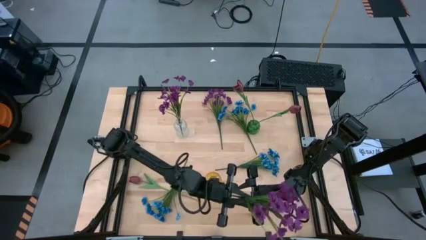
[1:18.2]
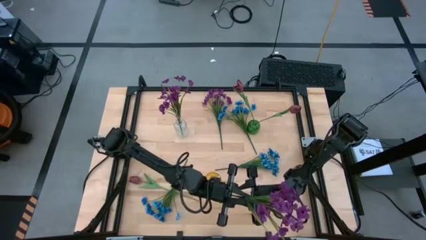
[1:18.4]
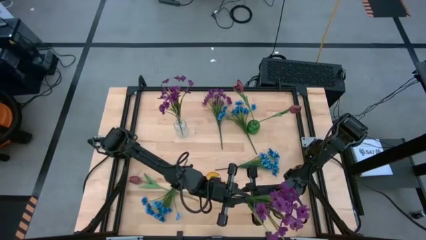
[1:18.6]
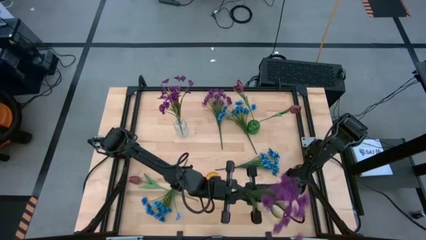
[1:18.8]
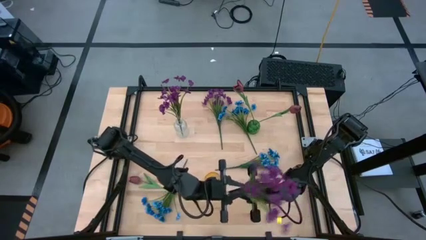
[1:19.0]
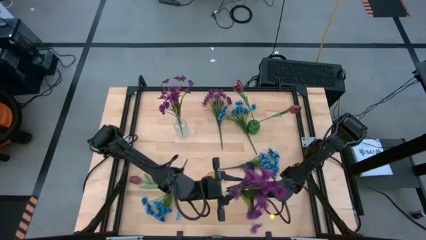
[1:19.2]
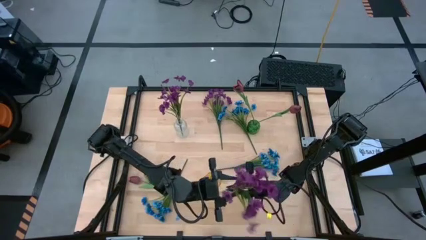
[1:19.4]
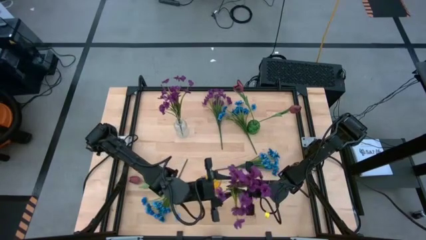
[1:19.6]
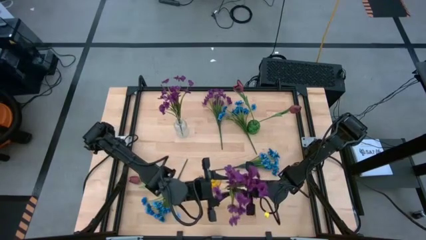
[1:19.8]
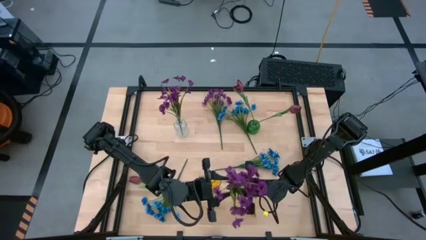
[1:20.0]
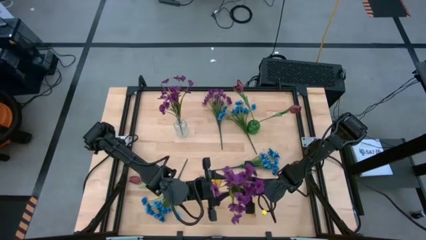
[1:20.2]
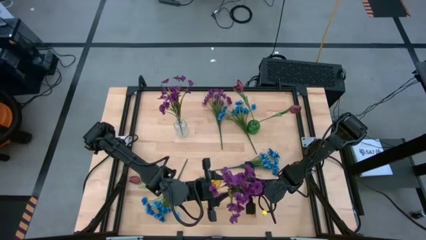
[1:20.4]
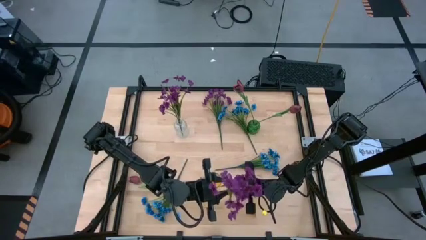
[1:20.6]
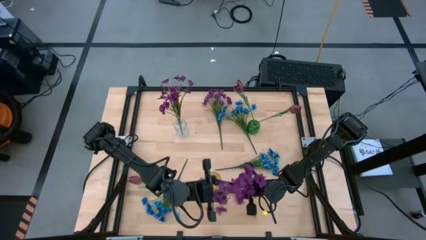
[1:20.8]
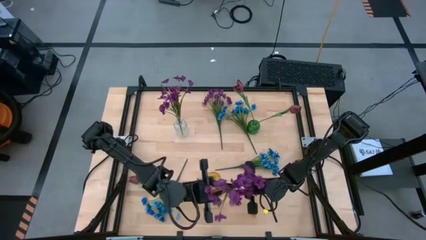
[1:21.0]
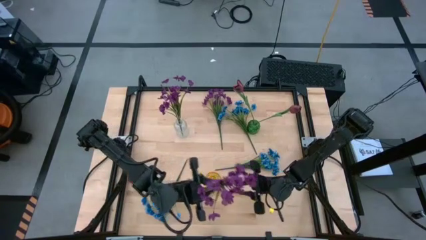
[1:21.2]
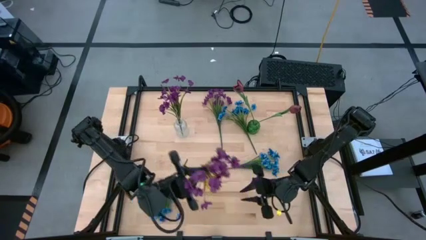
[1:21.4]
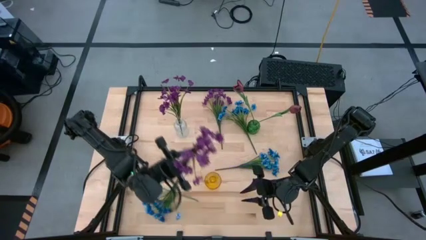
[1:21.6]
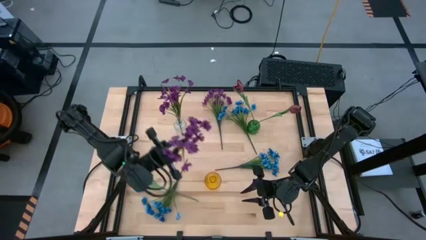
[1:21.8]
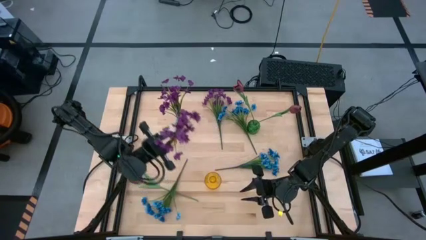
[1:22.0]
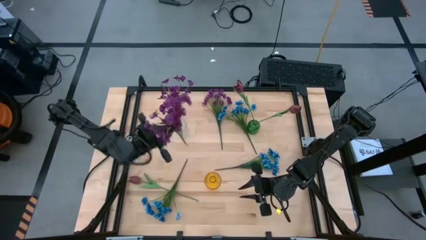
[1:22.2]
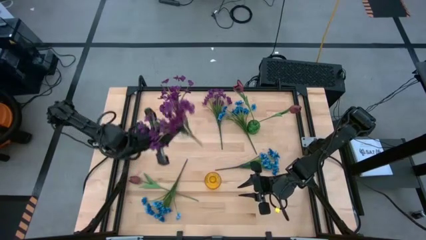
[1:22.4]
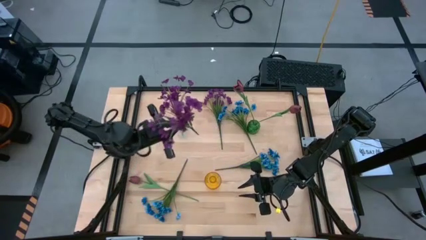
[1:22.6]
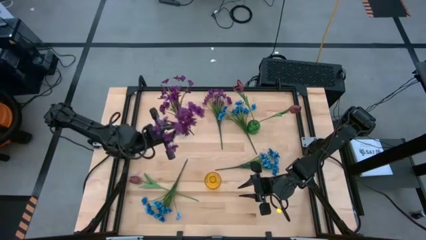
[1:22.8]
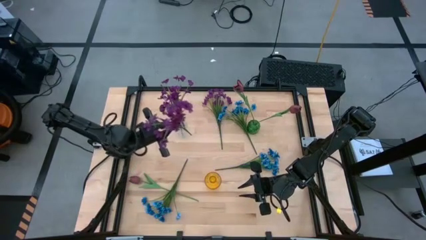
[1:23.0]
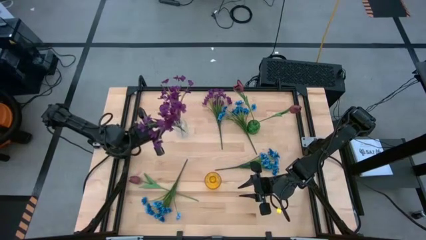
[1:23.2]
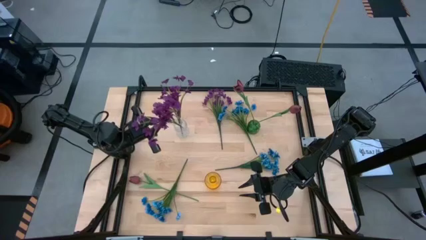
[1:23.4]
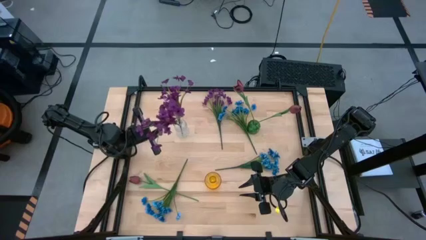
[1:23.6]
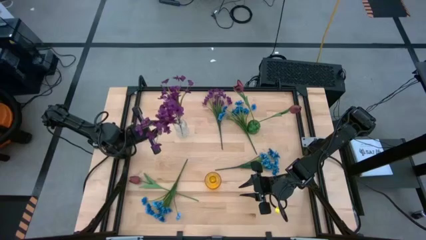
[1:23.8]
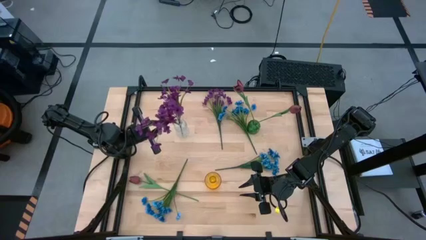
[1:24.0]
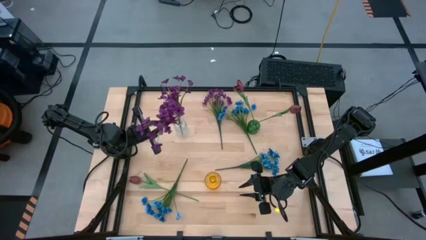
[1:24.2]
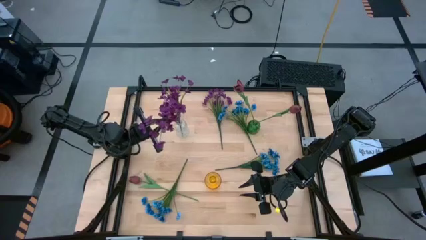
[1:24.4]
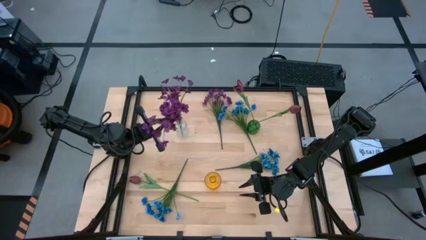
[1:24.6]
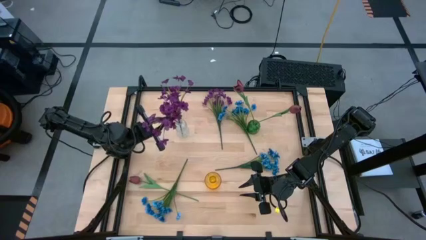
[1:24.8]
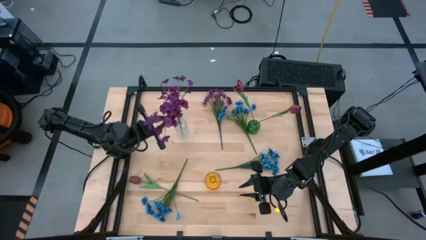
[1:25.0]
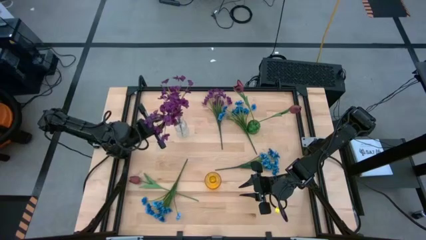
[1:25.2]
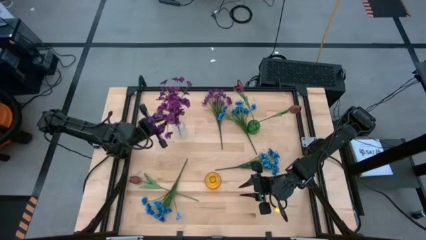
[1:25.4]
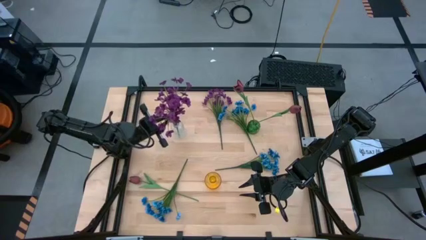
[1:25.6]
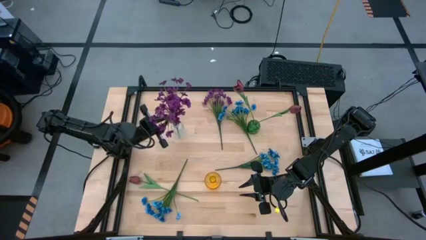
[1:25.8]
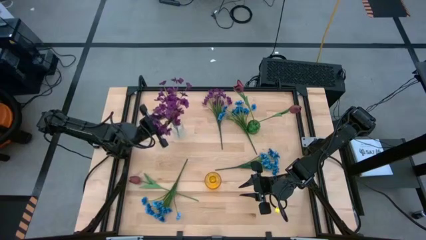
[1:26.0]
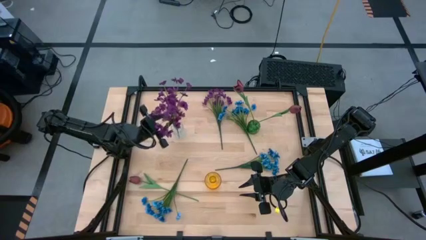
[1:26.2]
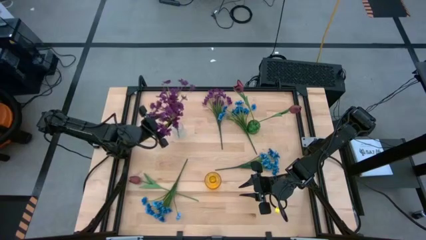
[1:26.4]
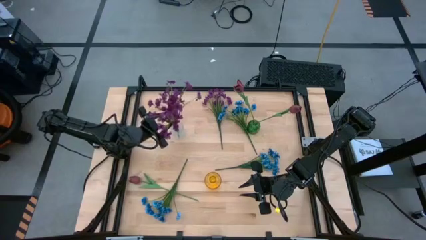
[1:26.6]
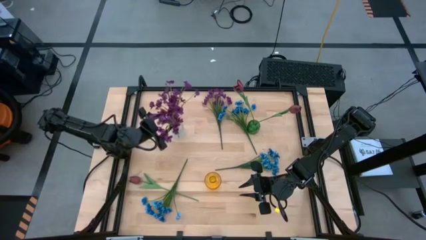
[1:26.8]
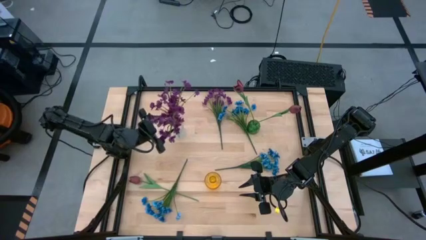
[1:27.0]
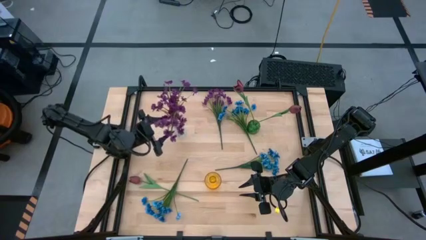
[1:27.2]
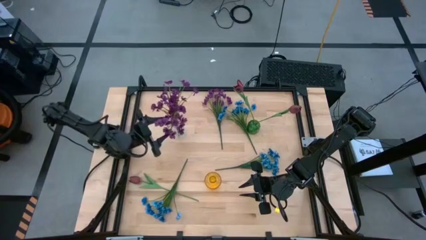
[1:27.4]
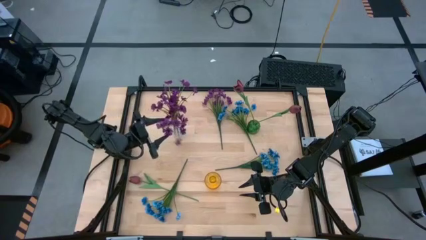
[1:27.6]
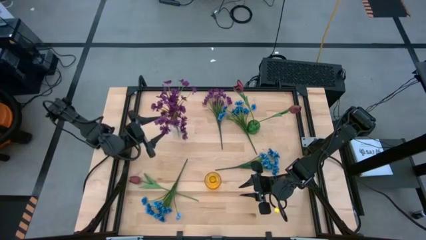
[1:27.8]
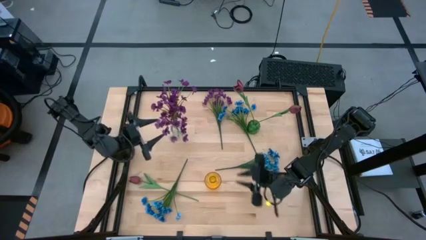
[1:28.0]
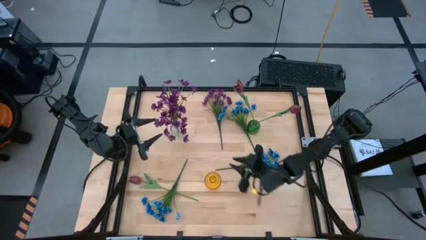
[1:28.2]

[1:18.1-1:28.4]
Task: Sort flowers into vase by color
Put the bottom violet flowers into the transparent vase

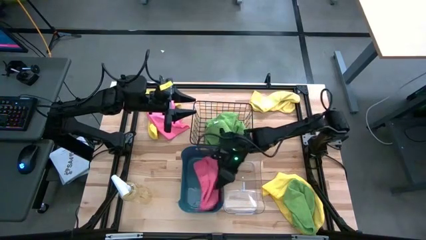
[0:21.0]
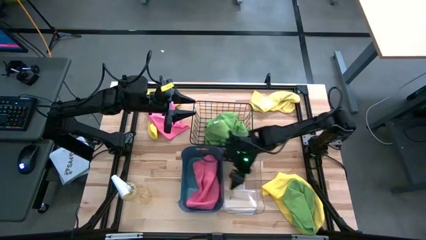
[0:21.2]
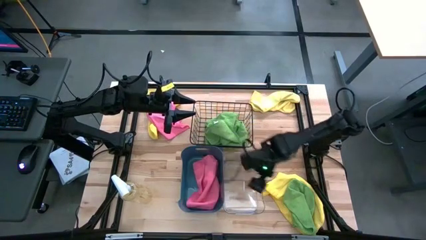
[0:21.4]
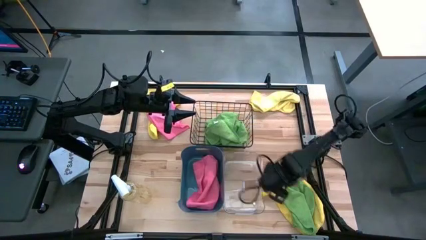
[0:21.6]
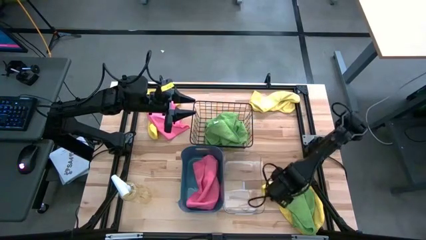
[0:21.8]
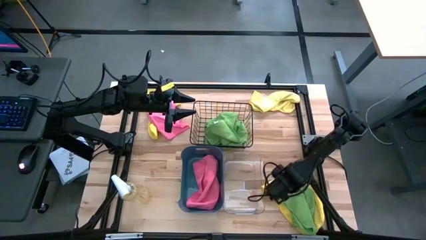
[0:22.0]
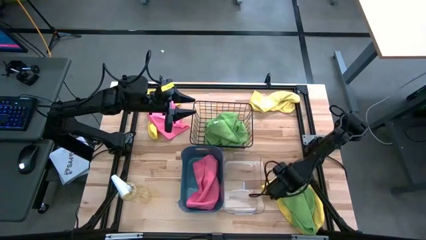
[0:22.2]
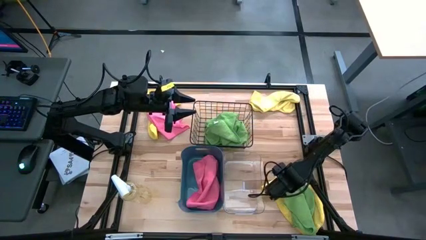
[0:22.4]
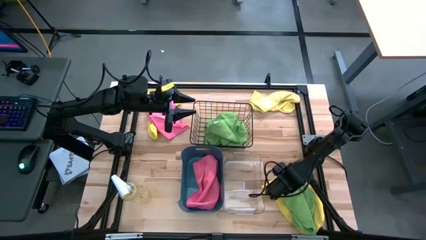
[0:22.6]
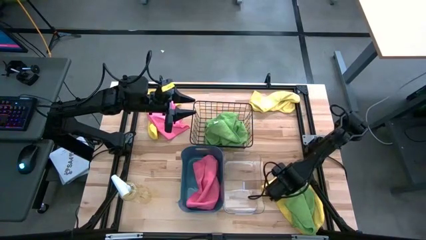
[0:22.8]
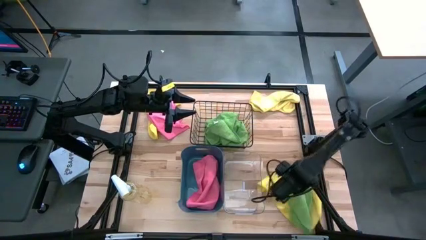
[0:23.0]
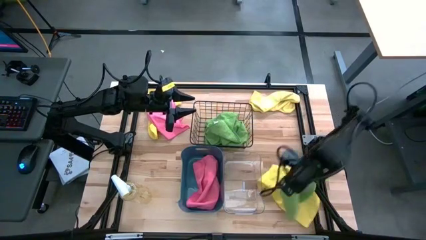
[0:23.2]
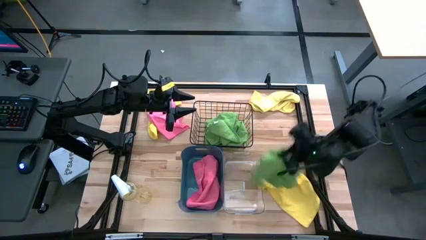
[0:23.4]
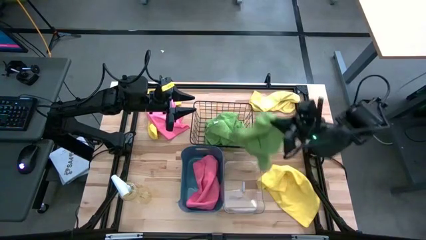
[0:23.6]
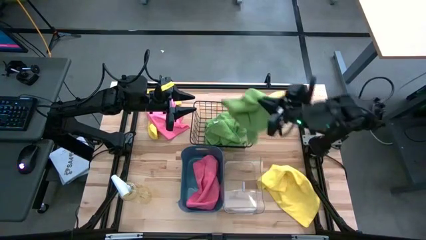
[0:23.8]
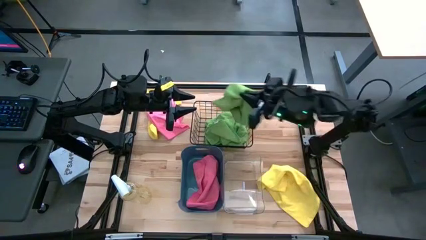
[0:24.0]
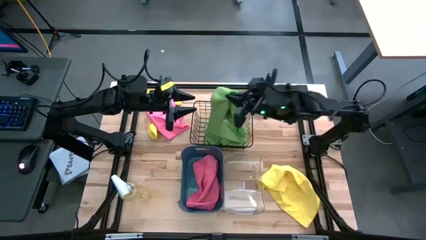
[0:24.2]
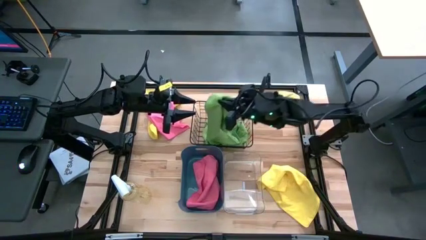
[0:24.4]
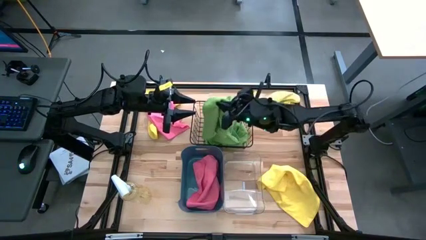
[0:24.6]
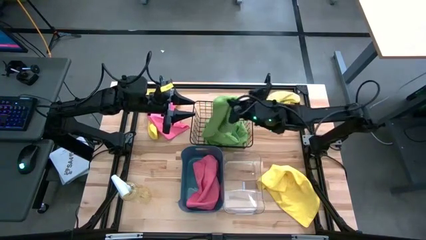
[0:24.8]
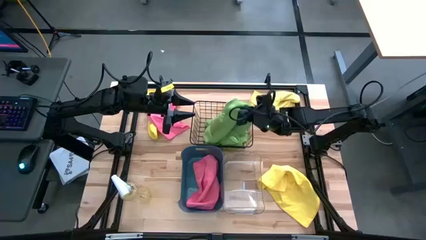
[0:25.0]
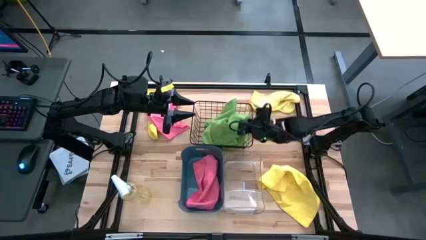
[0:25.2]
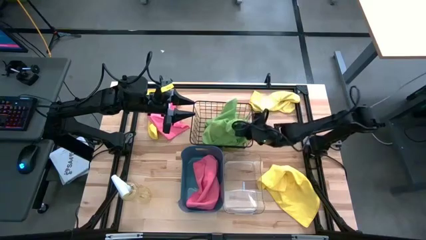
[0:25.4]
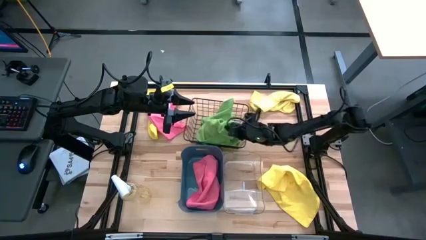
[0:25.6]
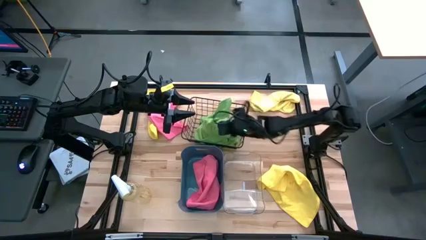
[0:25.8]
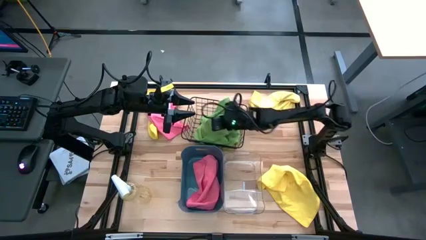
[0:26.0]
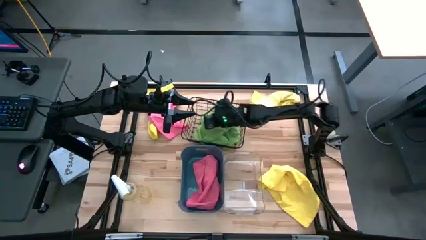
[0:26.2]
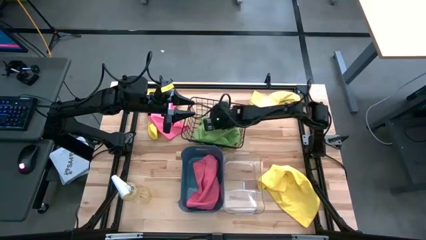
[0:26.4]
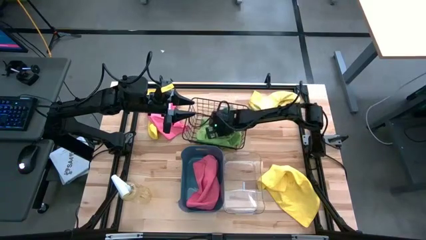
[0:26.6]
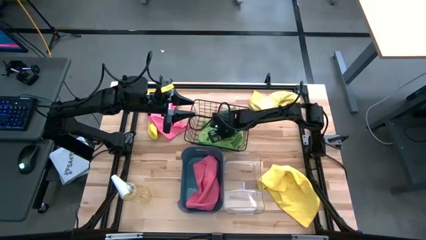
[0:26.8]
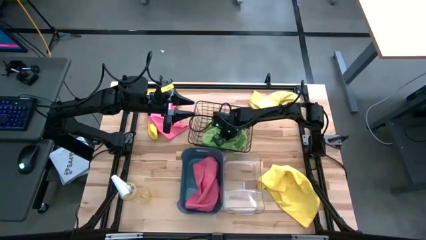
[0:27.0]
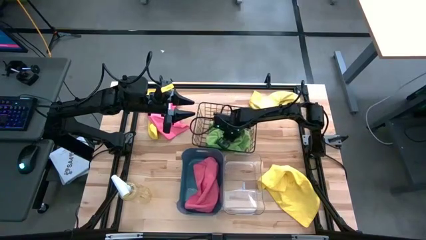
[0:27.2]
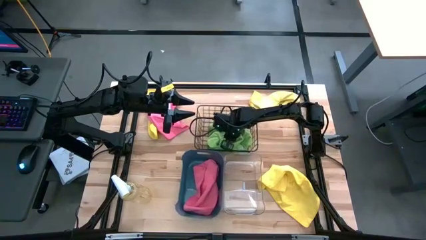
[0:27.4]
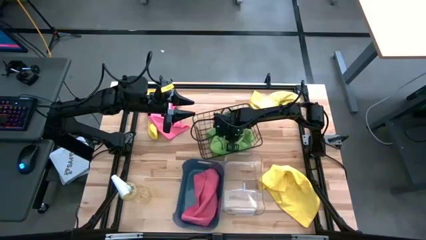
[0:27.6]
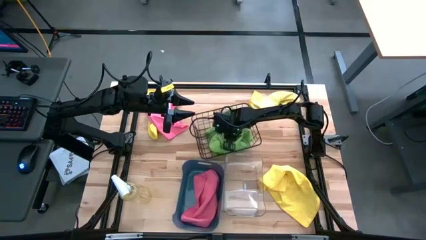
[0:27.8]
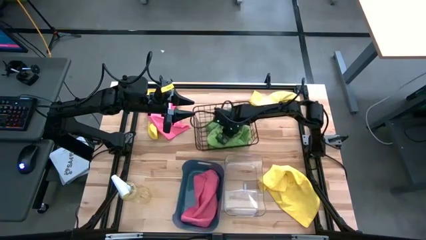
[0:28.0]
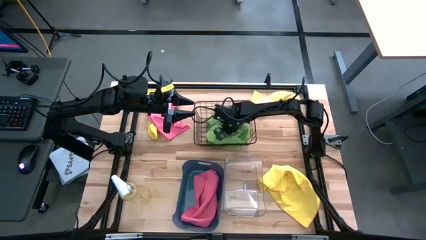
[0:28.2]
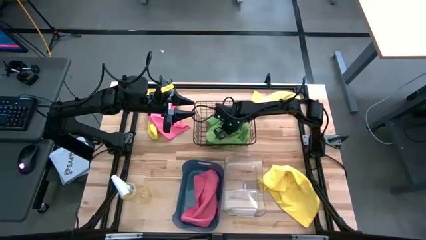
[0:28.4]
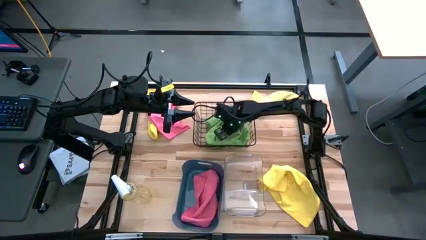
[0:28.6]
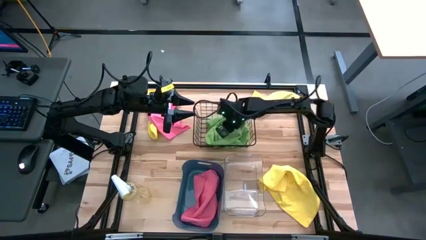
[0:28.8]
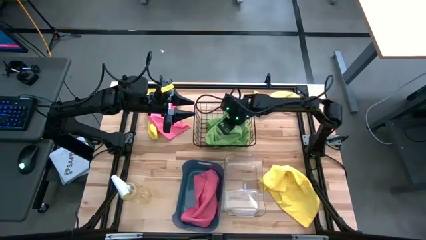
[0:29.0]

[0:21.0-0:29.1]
Task: Sort microfiber towel by color & place in baskets
Put the green microfiber cloth into the wire basket
